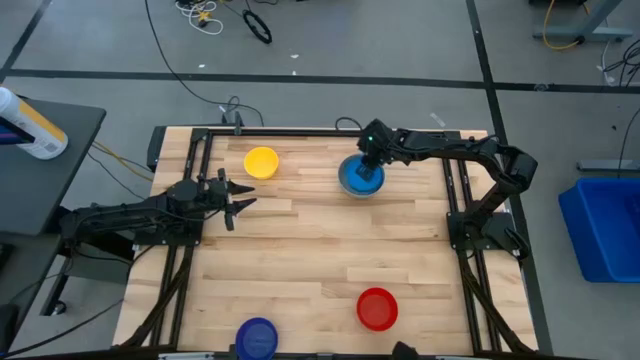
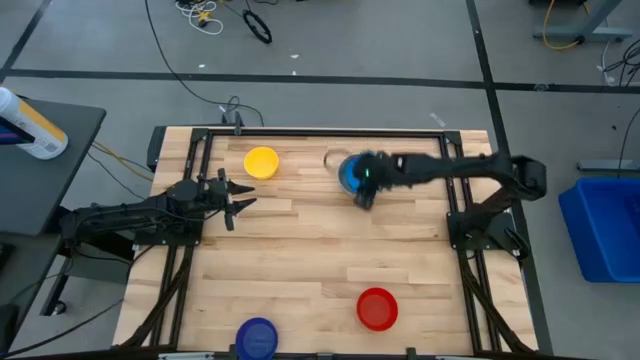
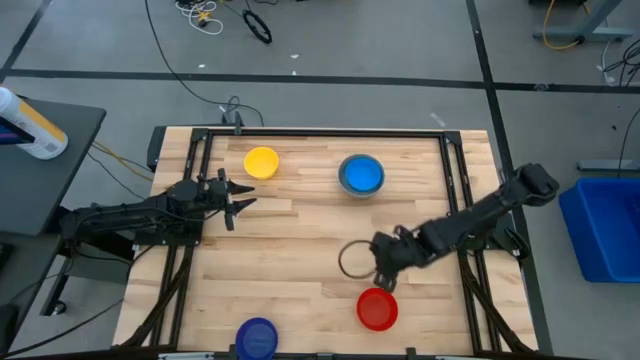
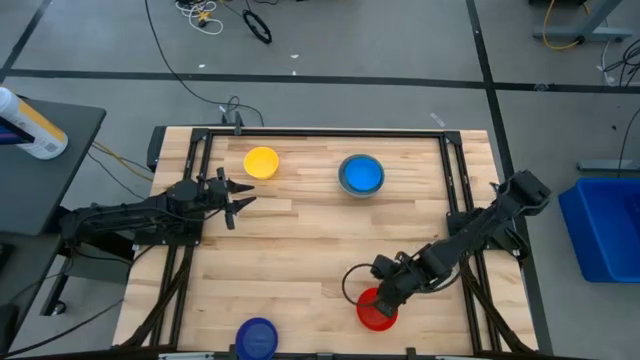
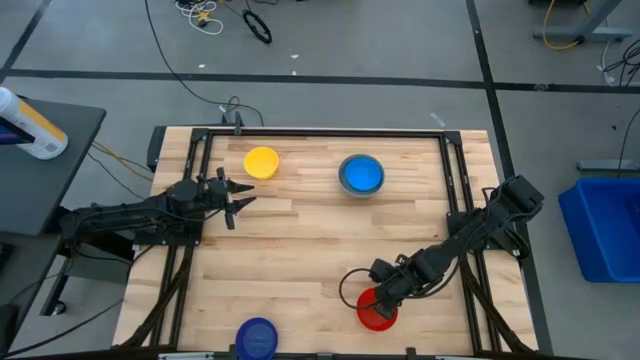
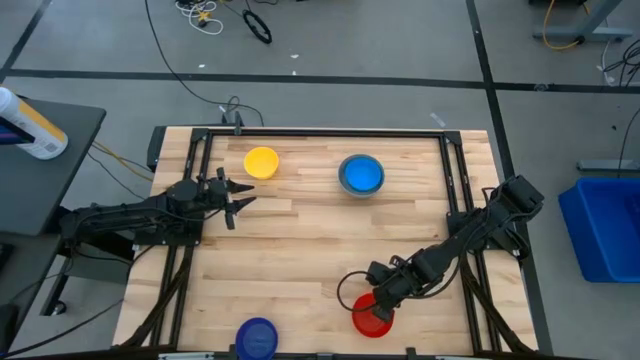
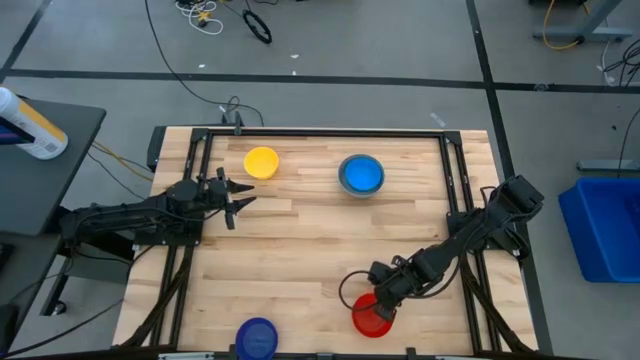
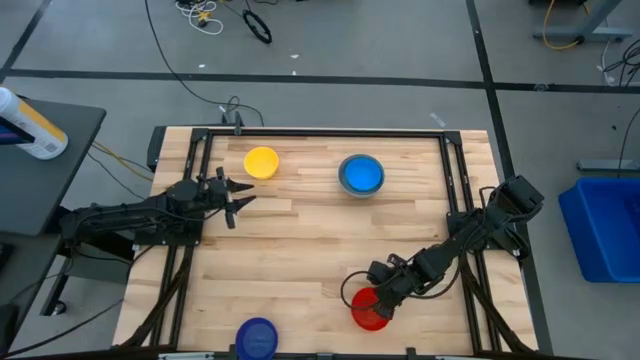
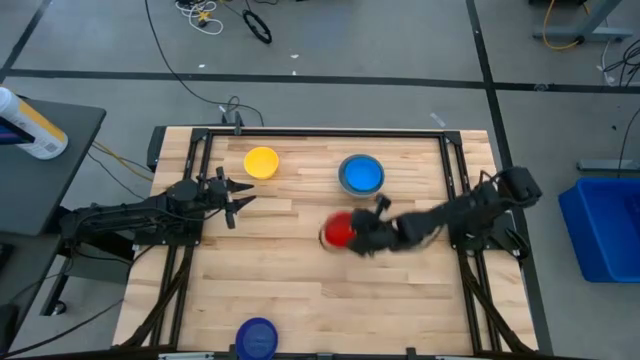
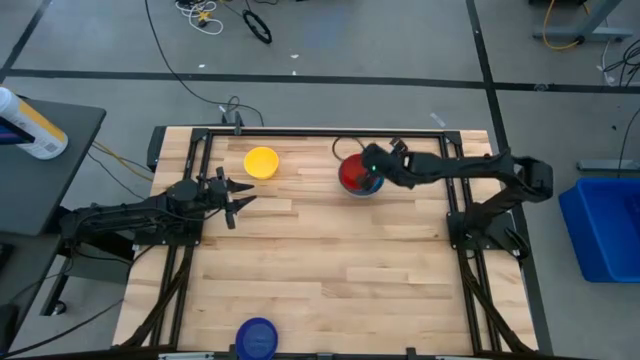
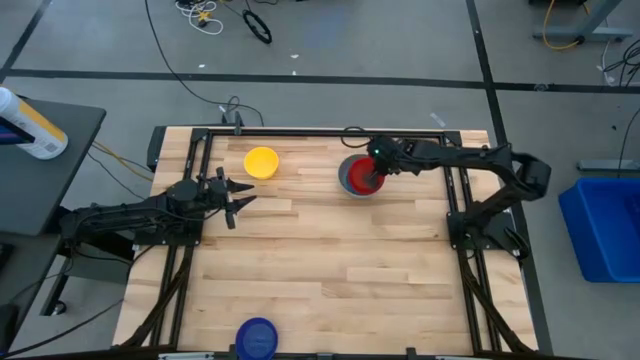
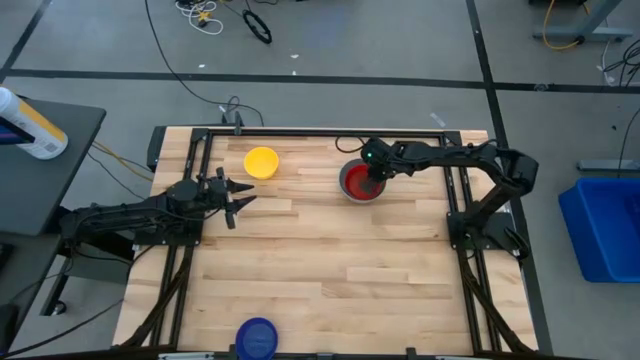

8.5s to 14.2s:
Stack the red bowl on the light blue bowl

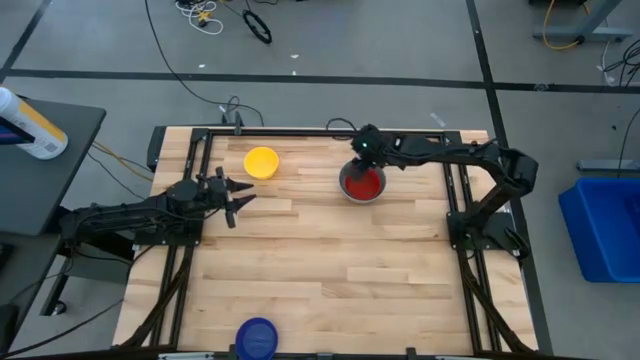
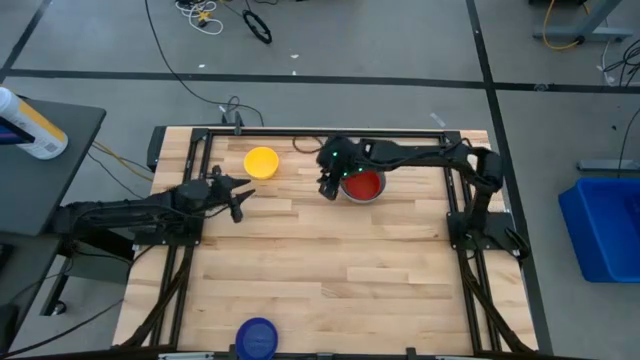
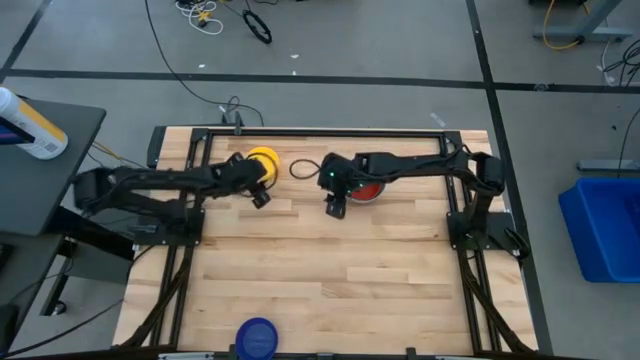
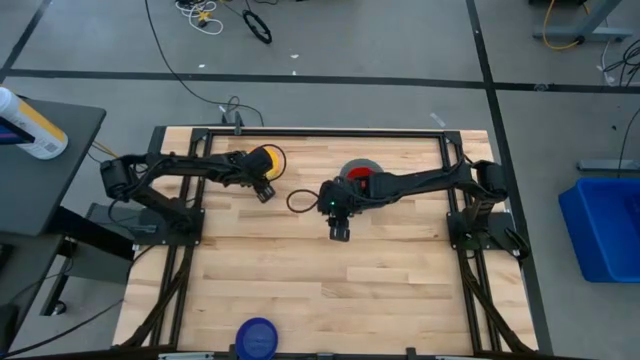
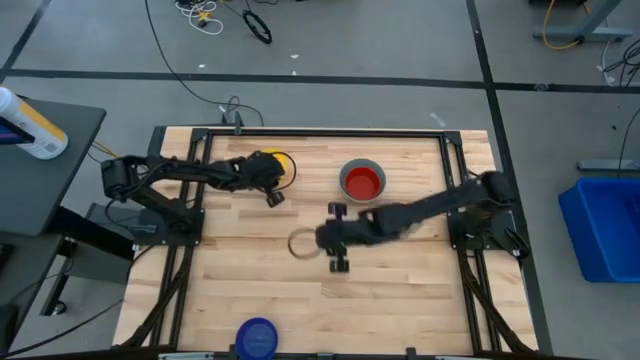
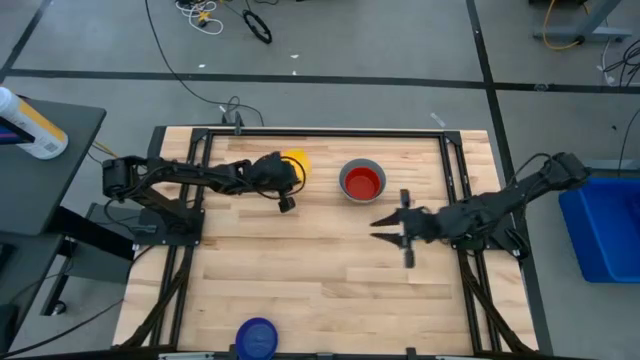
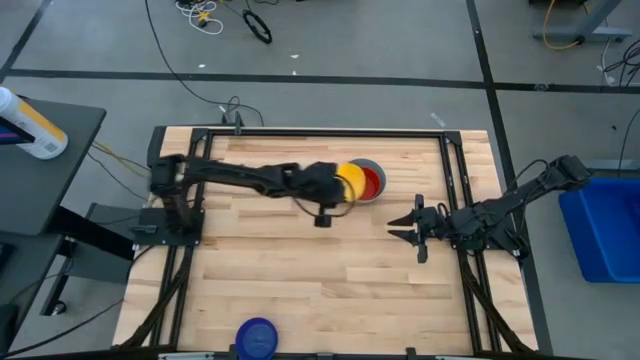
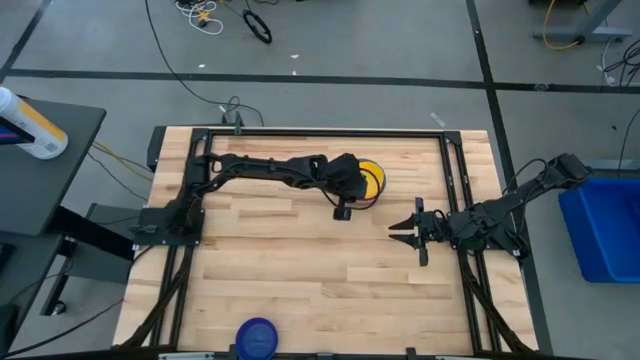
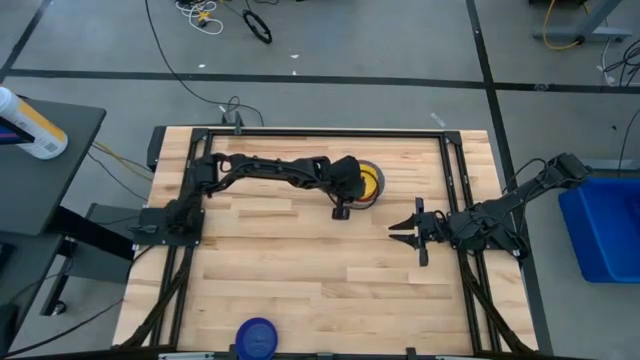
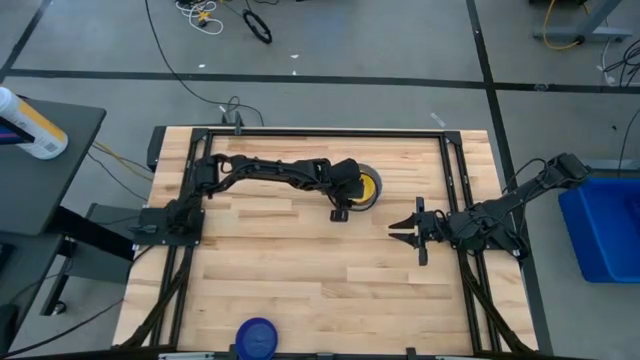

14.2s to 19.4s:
Stack the yellow bowl on the red bowl

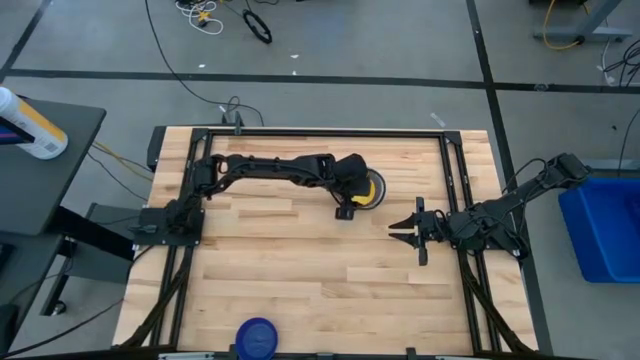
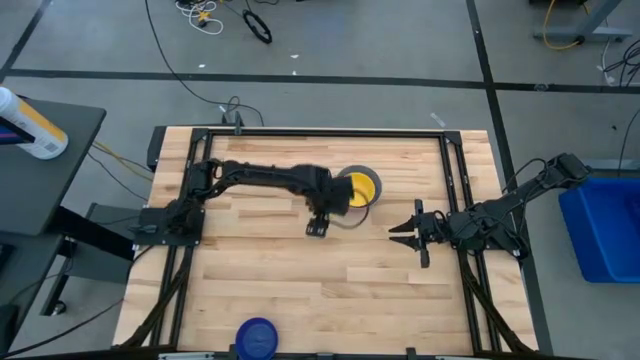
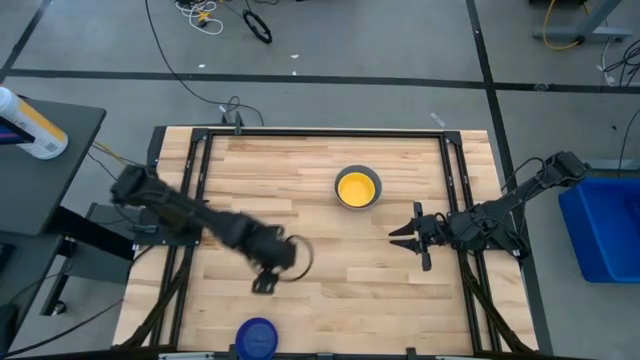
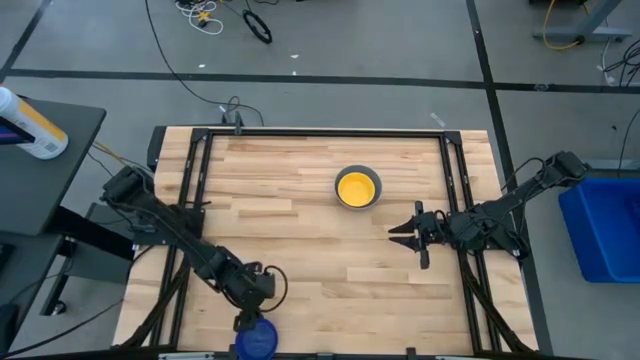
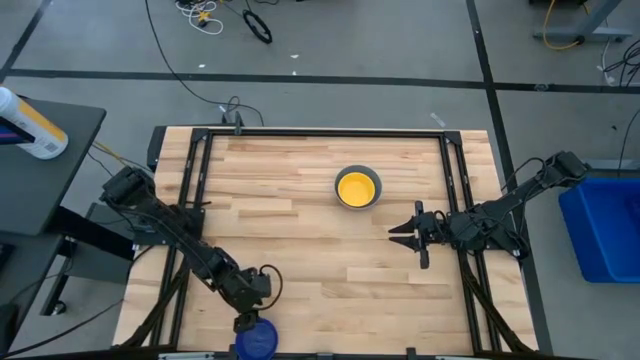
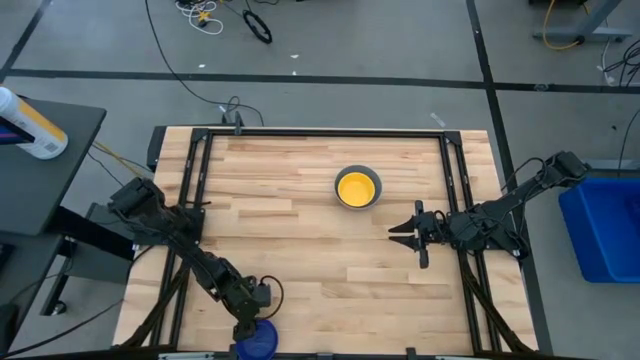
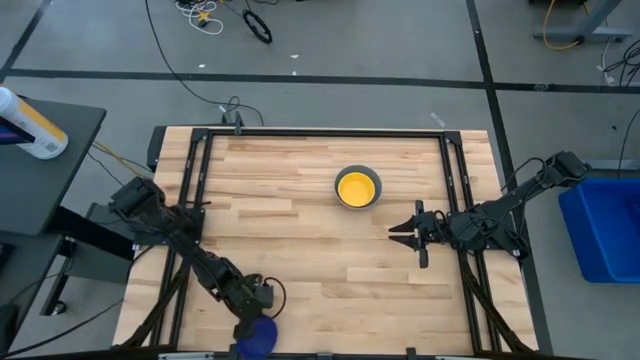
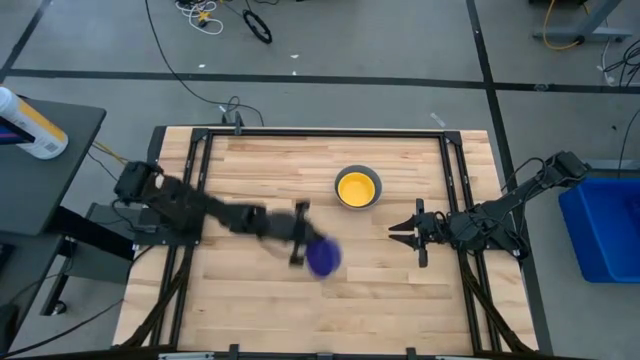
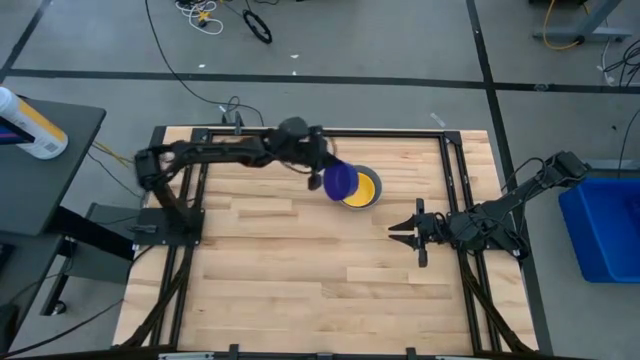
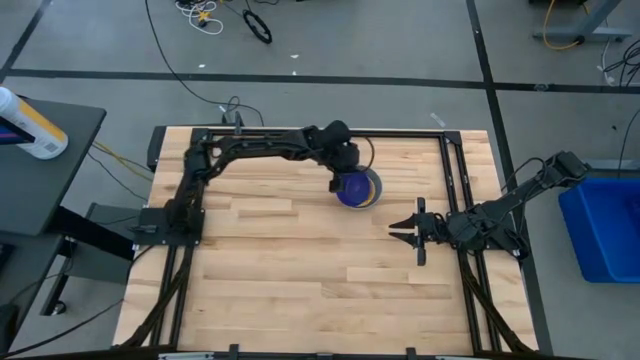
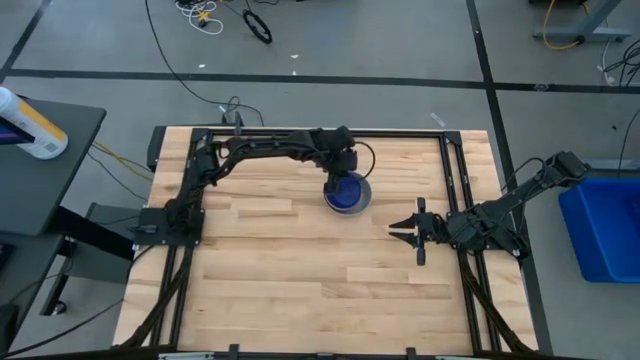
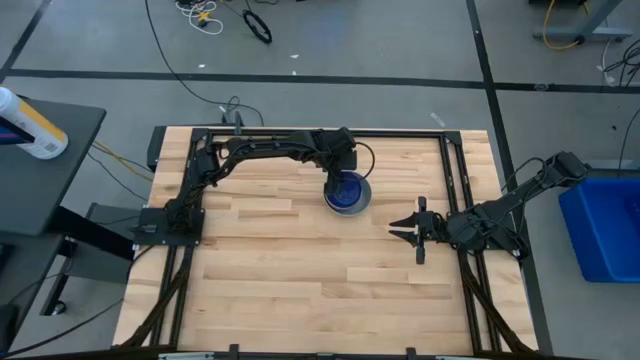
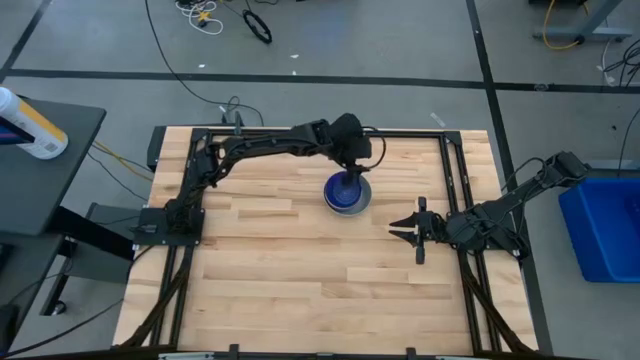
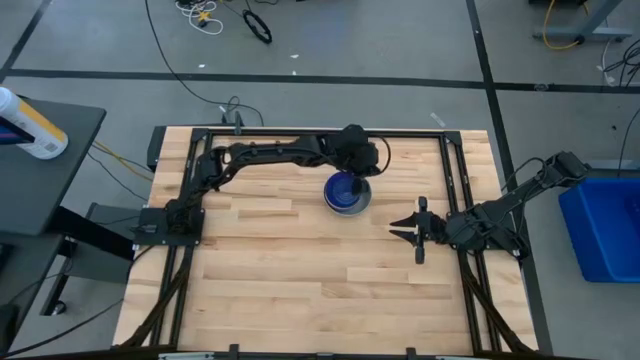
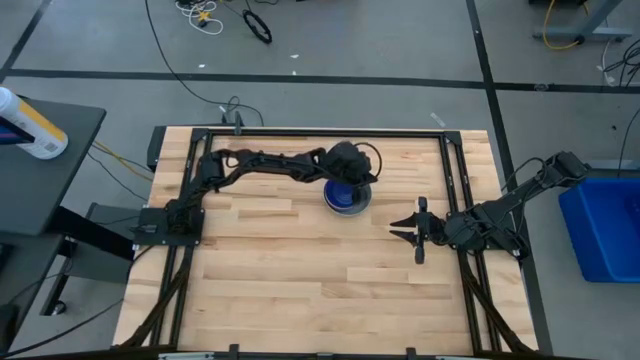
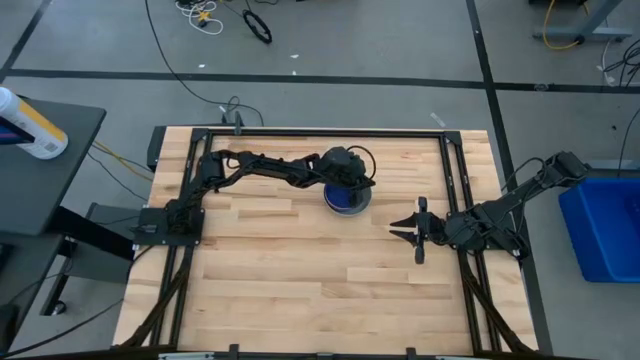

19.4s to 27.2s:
Stack the dark blue bowl on the yellow bowl
